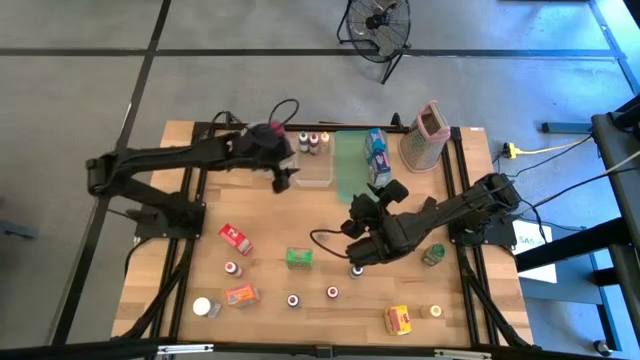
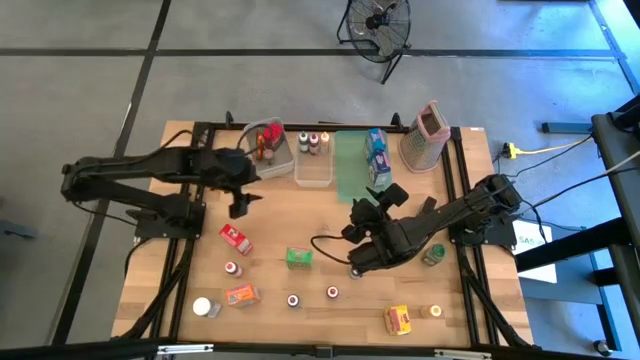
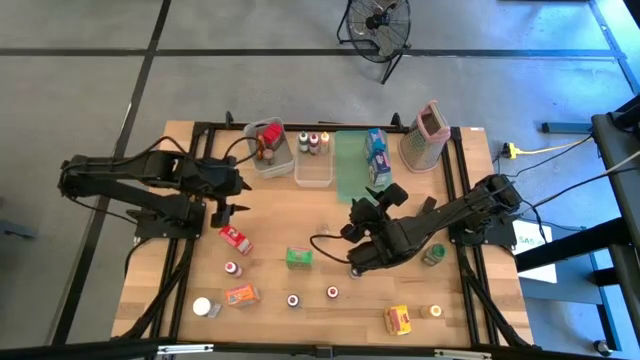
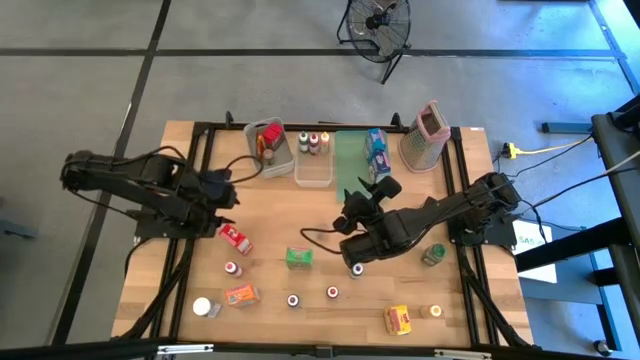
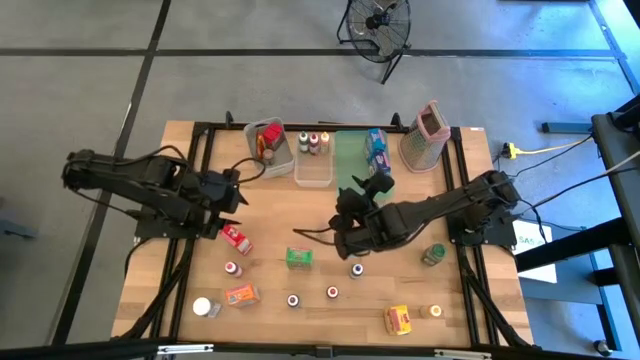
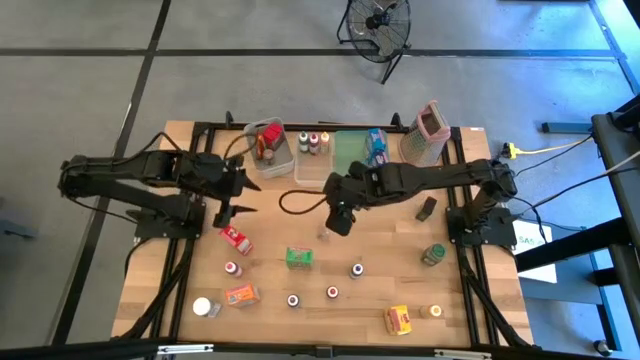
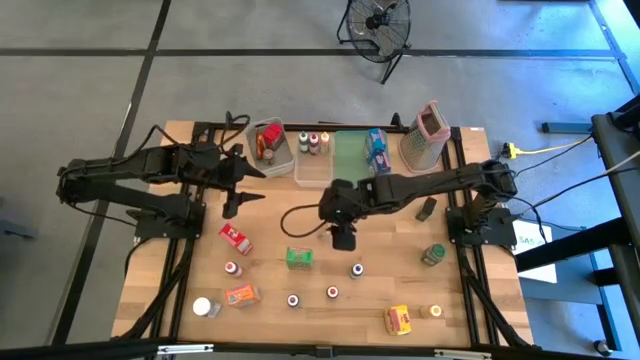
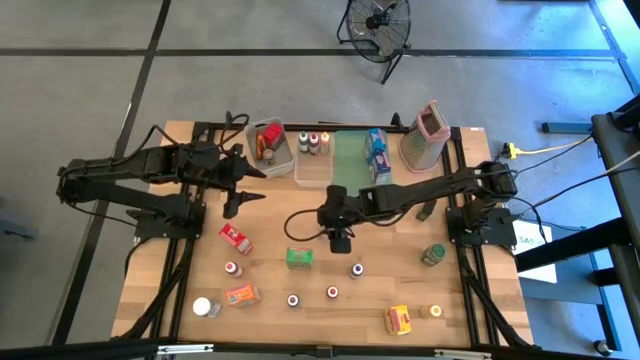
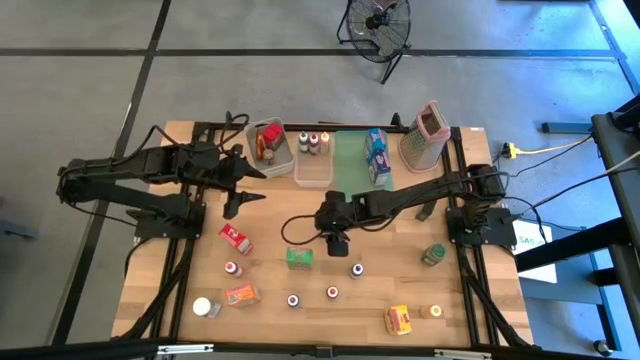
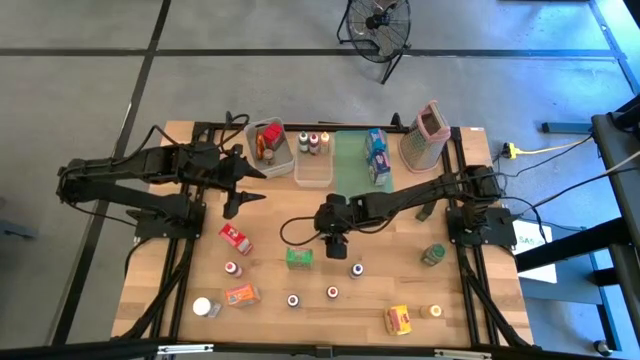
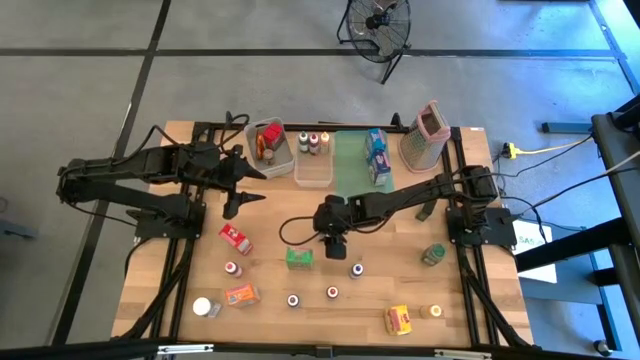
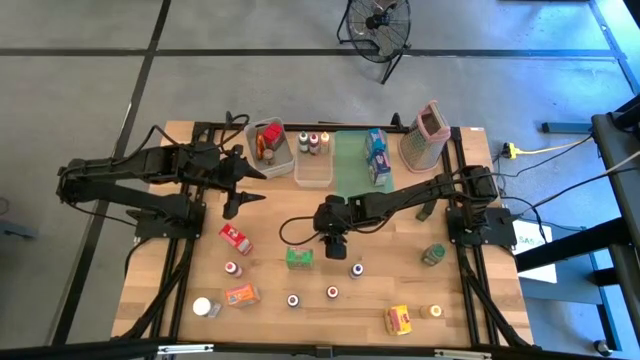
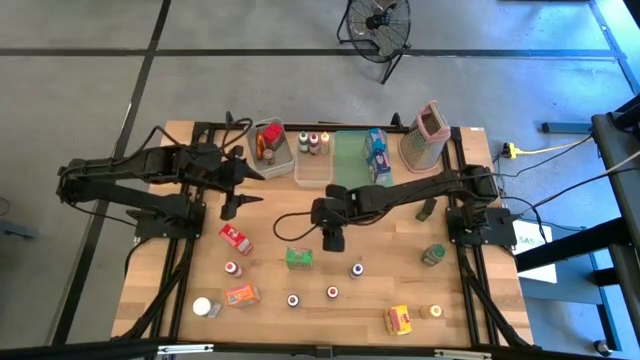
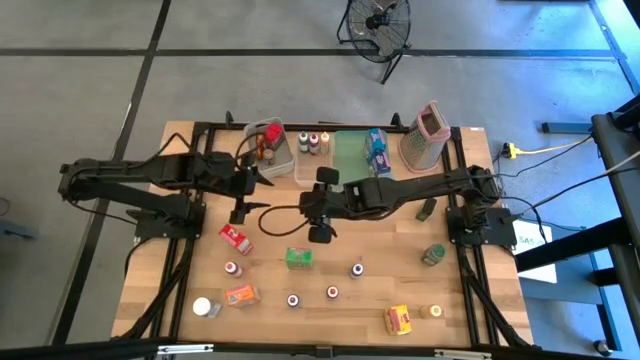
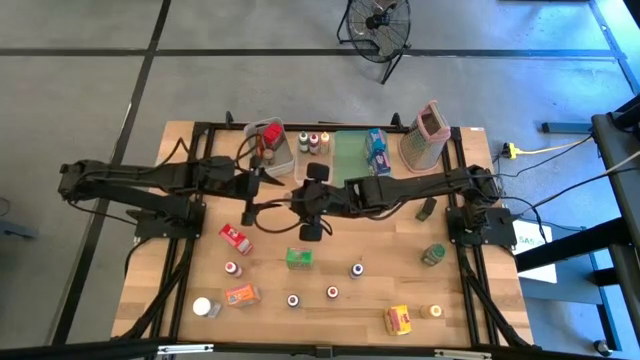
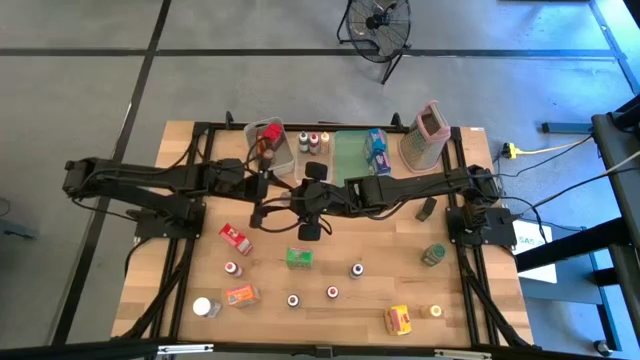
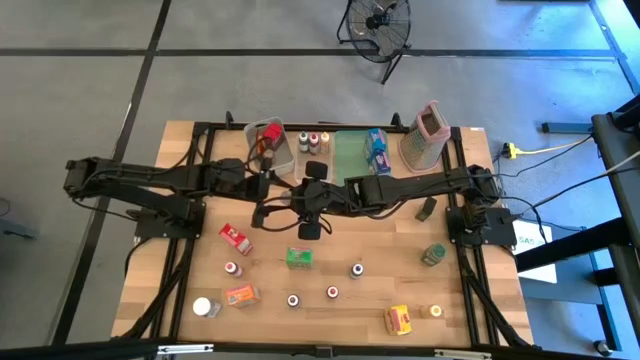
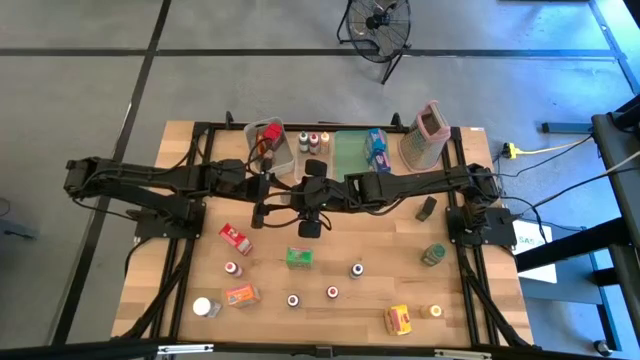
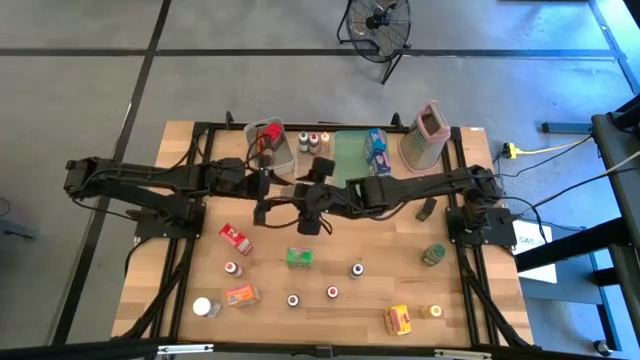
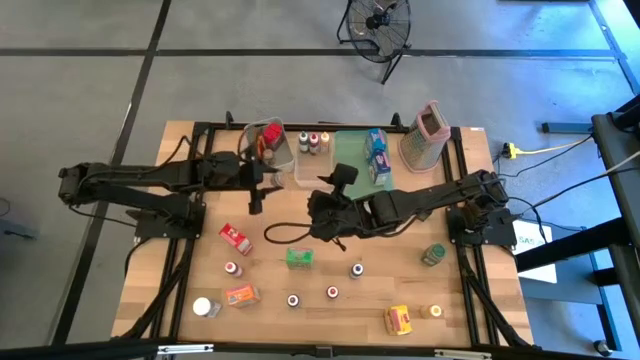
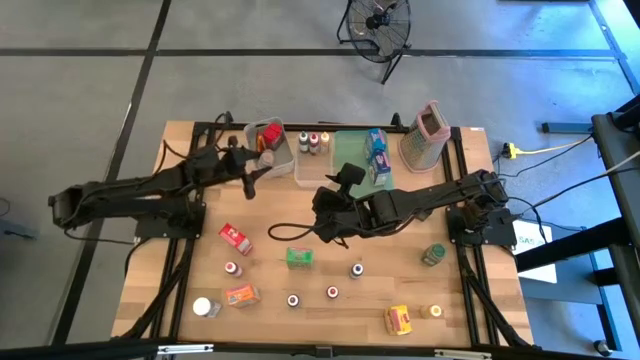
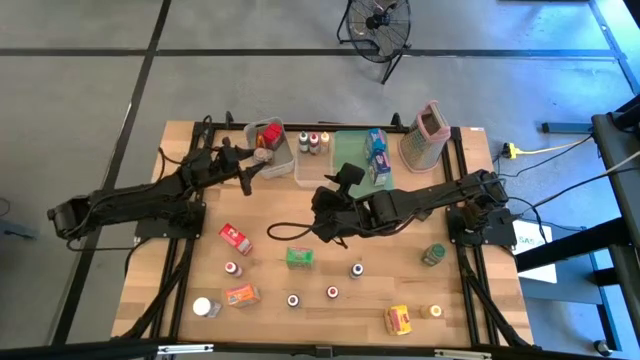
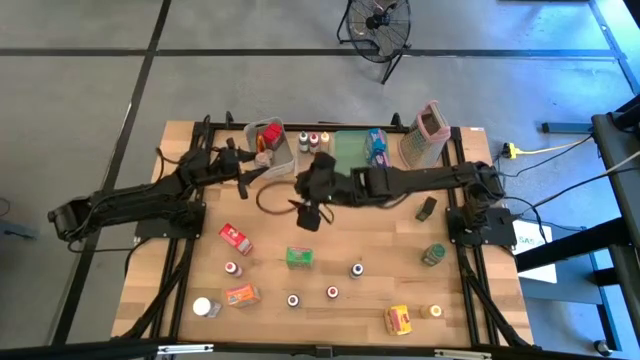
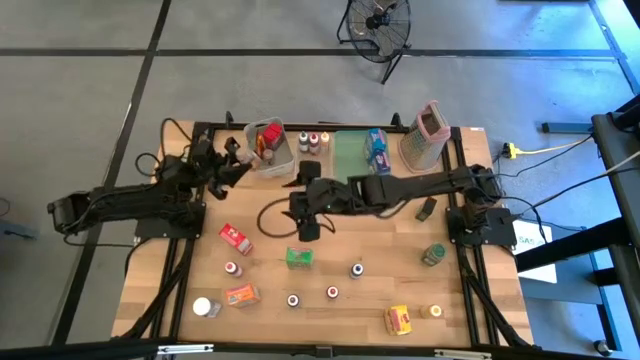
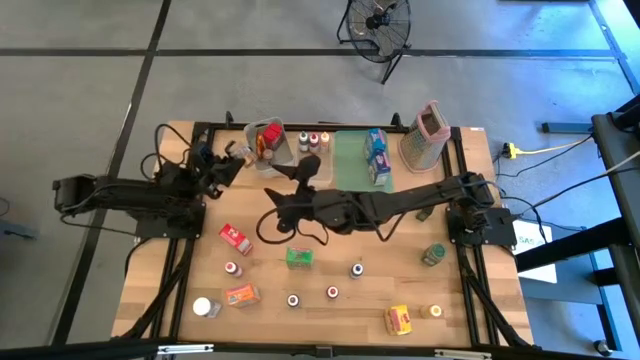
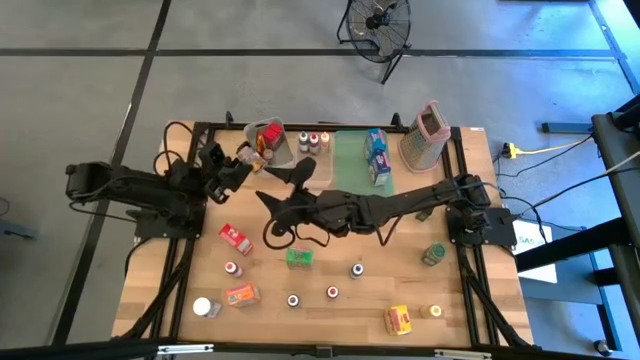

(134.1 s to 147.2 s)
Task: Pick & Place Kitchen Items
Put the brown seasoning bottle into the gray bin

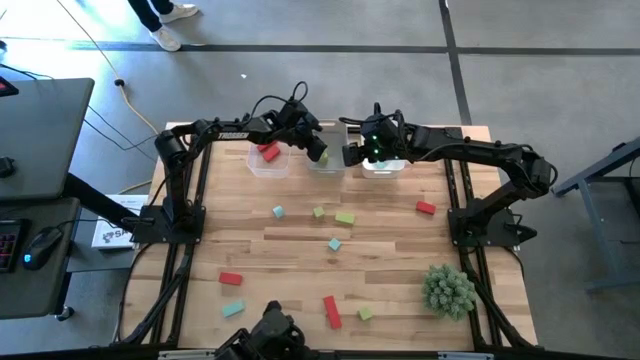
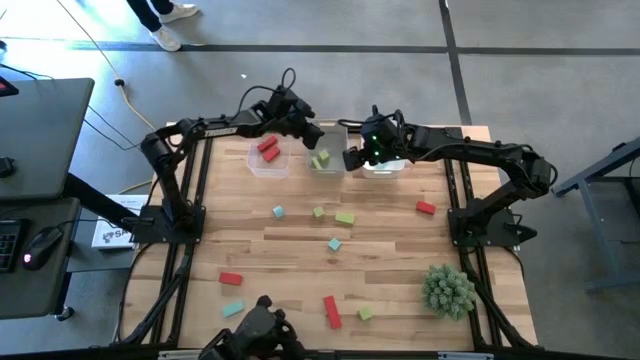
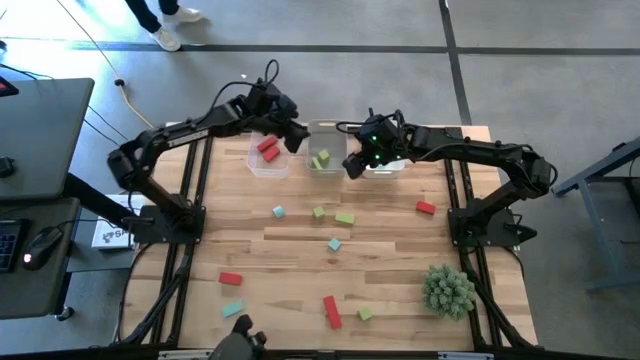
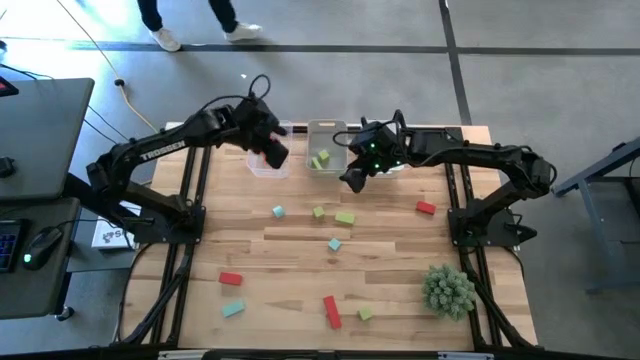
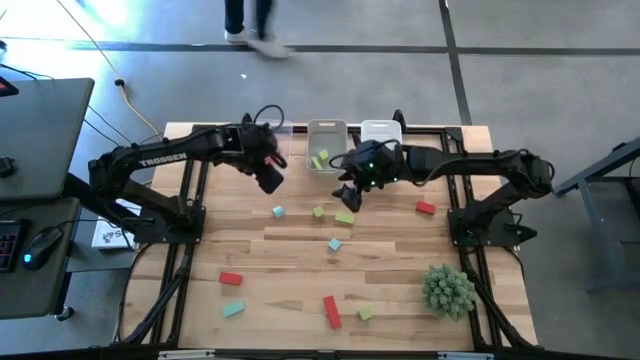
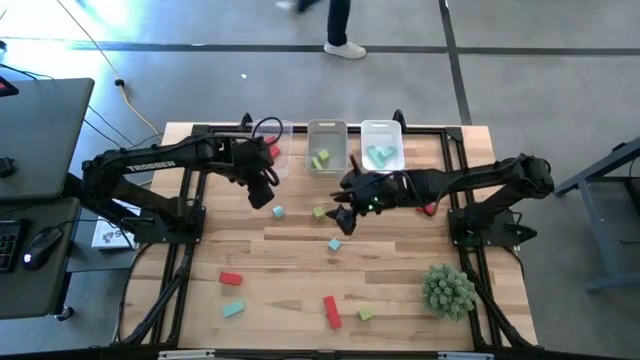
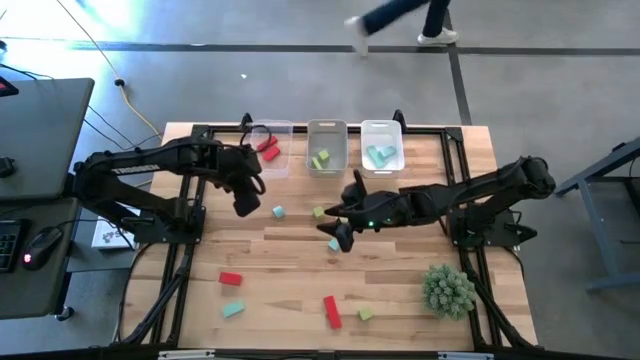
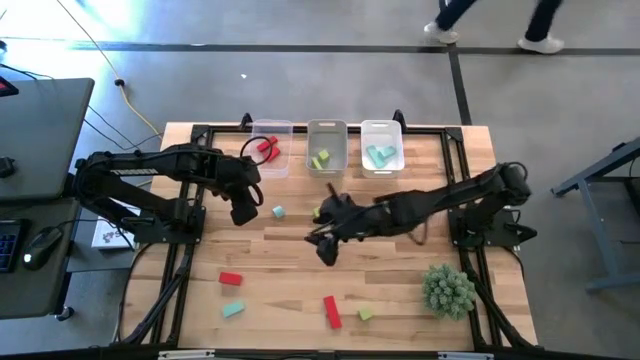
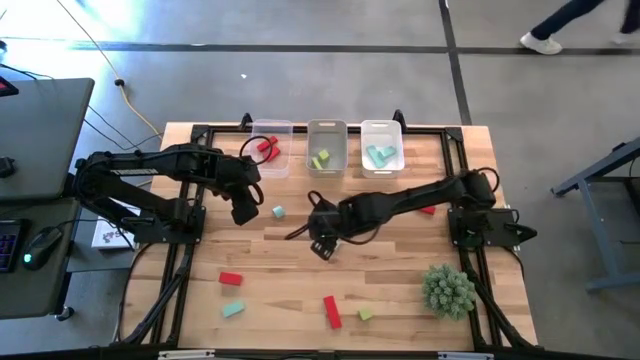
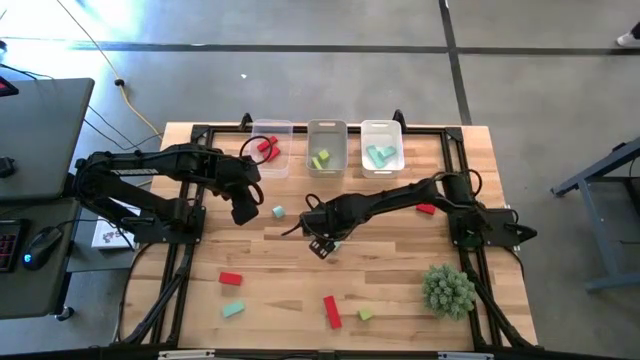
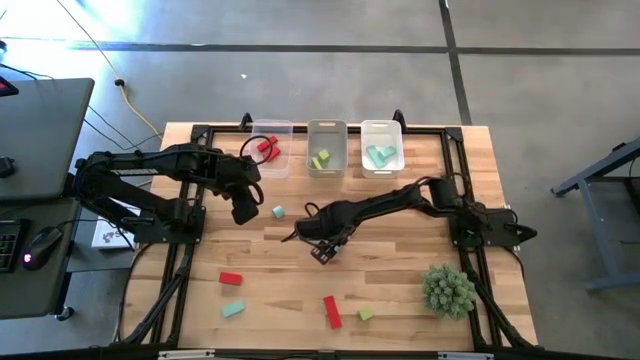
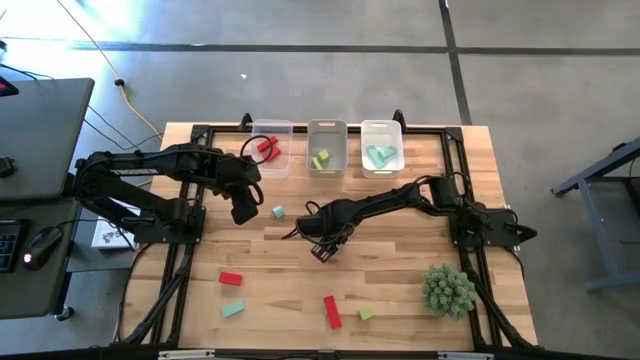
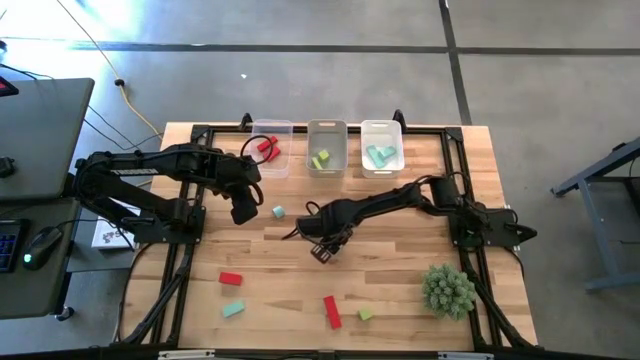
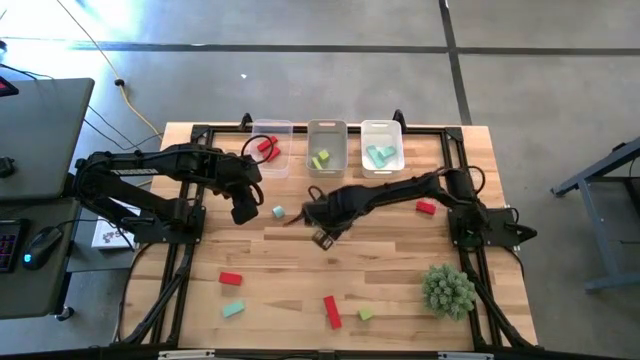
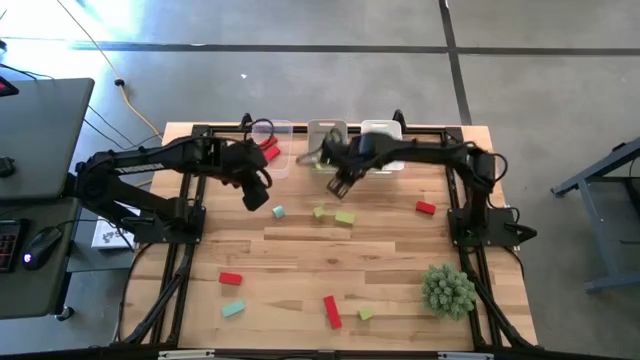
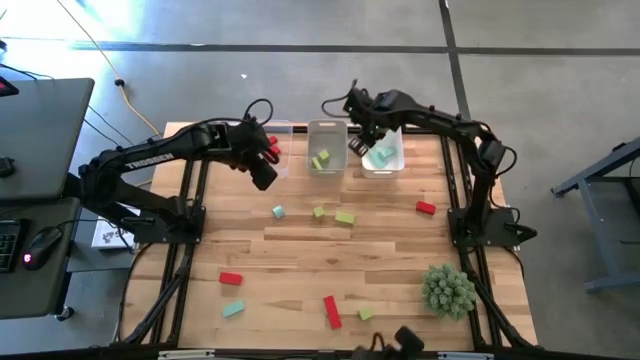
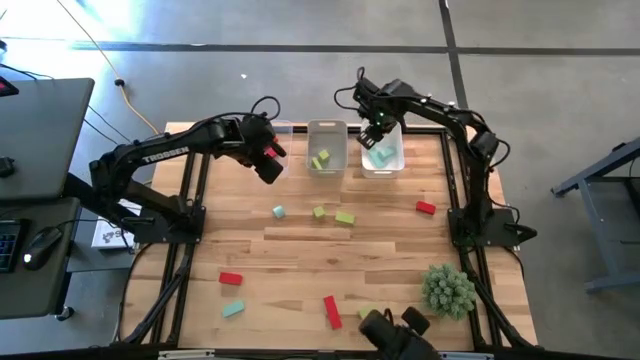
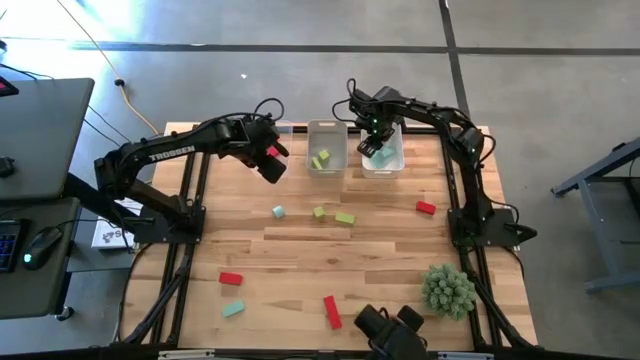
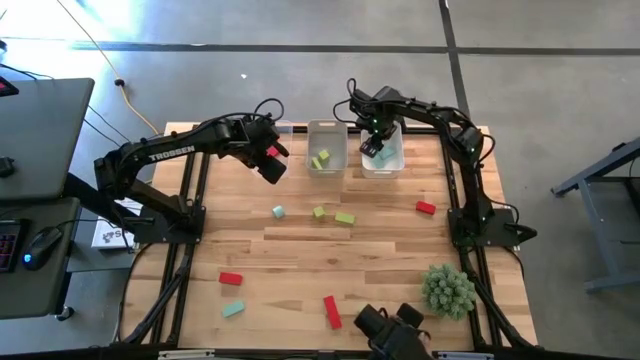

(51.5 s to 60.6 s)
Task: Sort & place blocks by color
Put the blue block into the white bin
